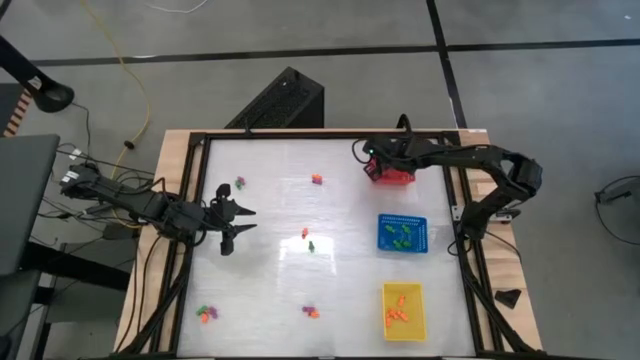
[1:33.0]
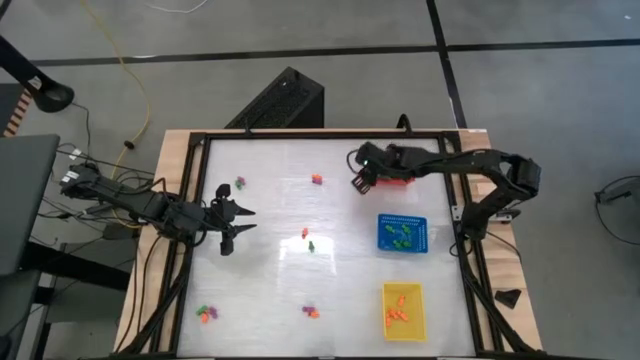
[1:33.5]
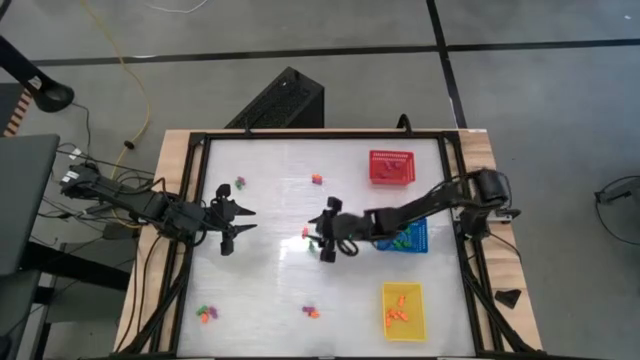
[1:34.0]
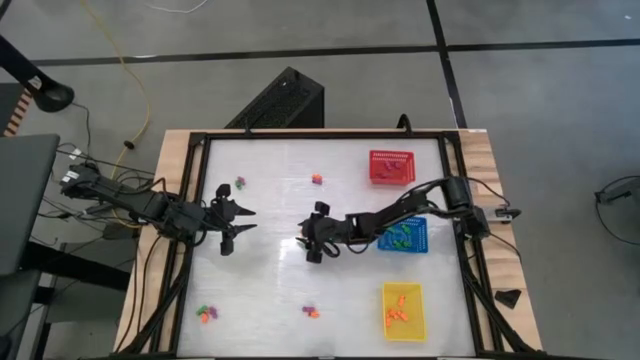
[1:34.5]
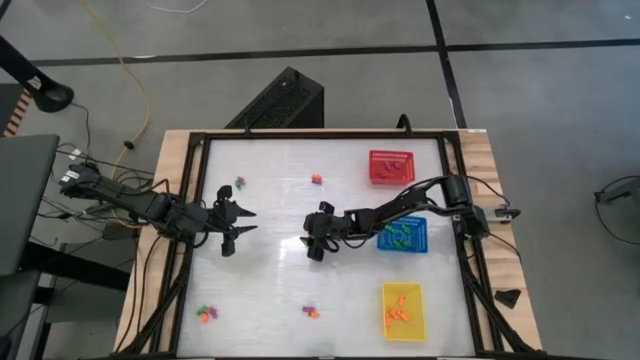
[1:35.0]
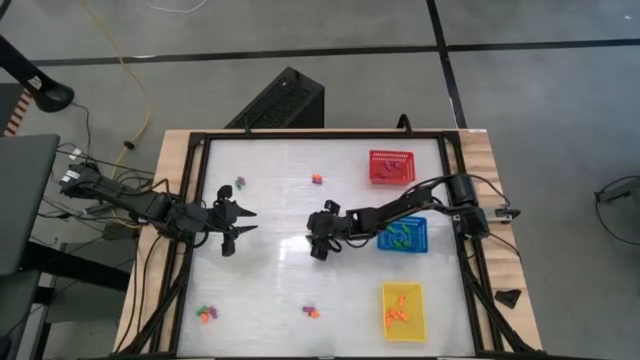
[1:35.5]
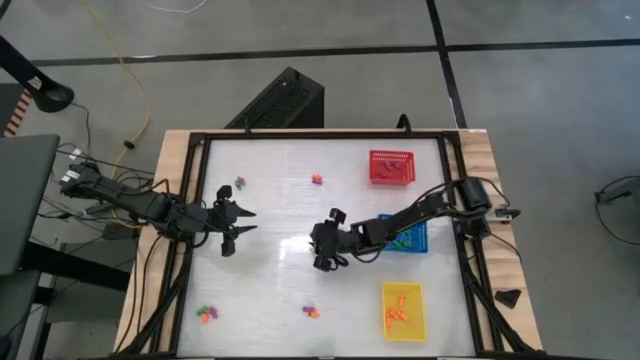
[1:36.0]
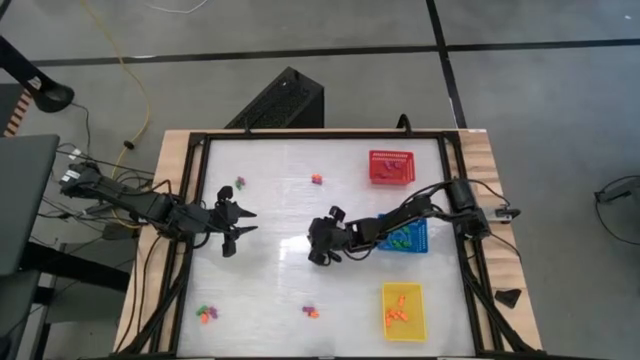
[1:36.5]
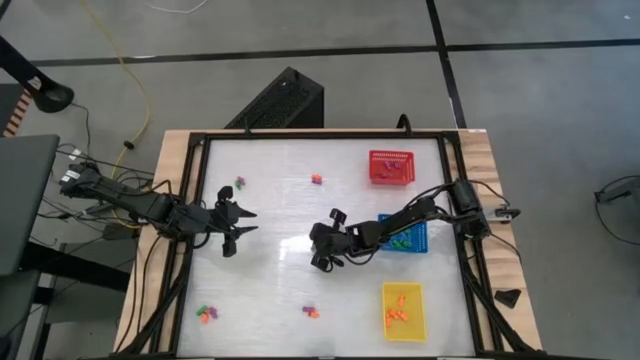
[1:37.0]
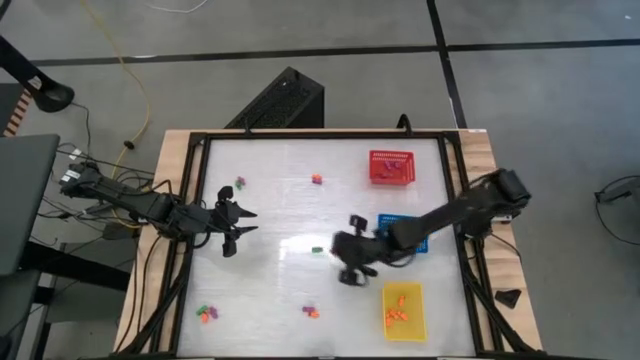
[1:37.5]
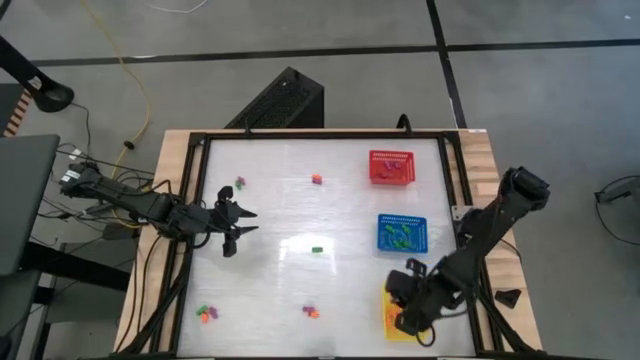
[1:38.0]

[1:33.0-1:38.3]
Task: Sort Halloween decoration
Put the orange skeleton toy into the yellow basket

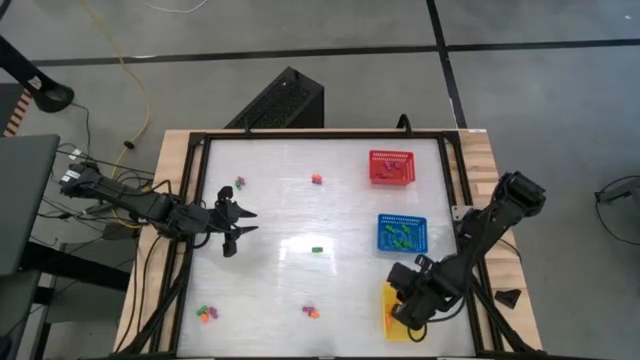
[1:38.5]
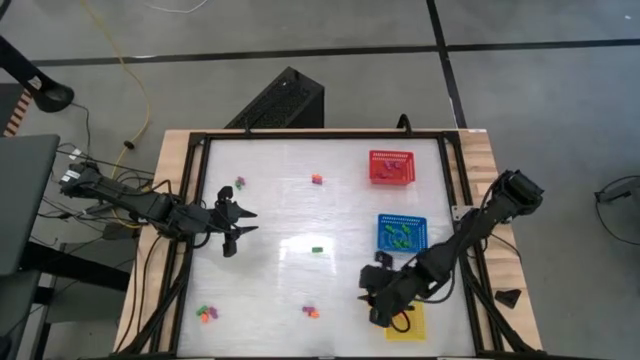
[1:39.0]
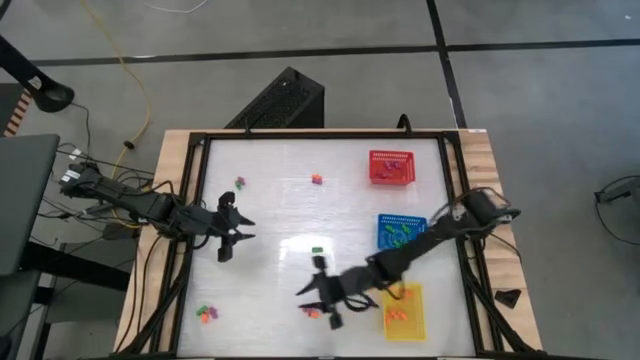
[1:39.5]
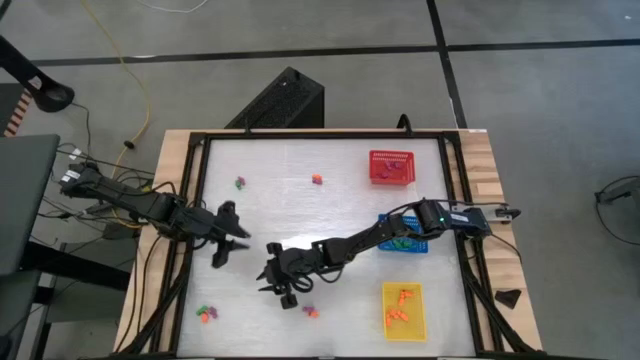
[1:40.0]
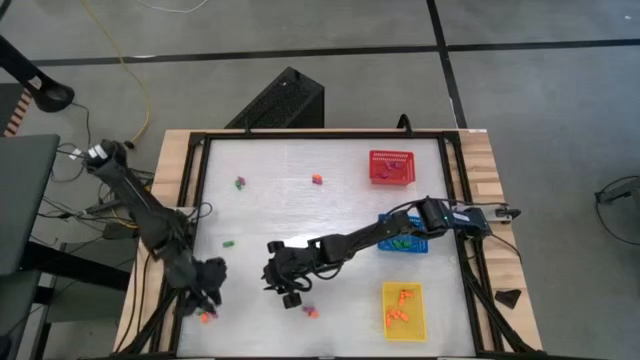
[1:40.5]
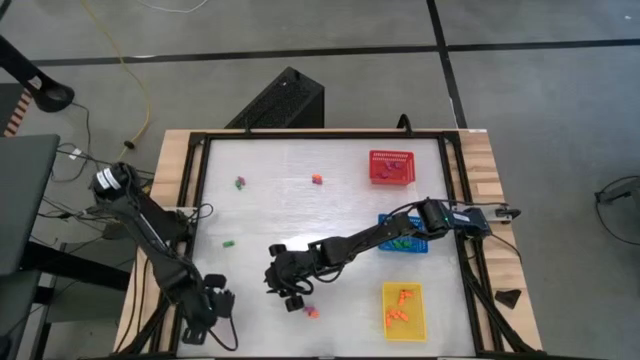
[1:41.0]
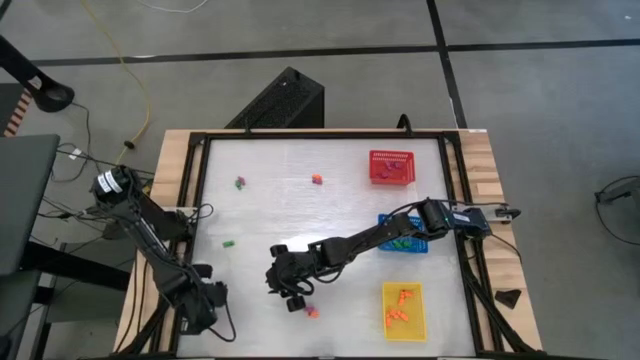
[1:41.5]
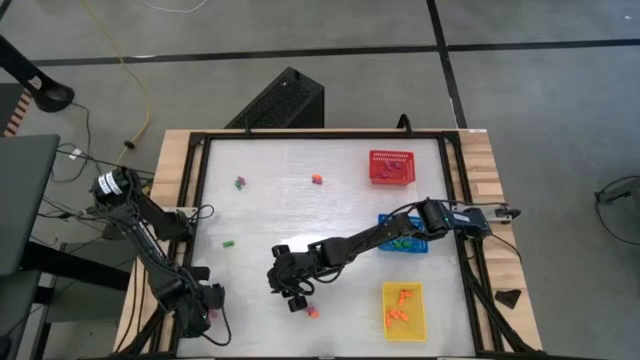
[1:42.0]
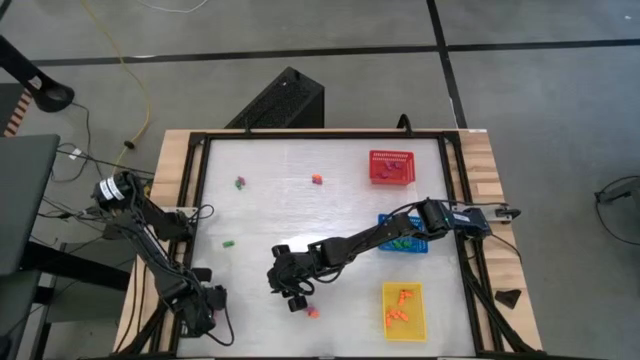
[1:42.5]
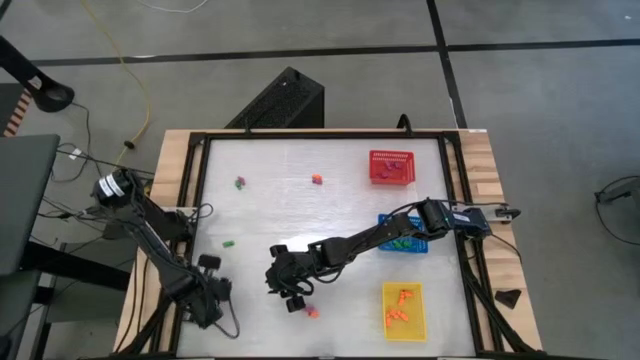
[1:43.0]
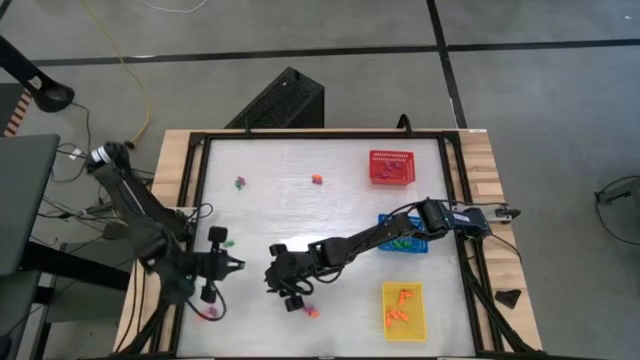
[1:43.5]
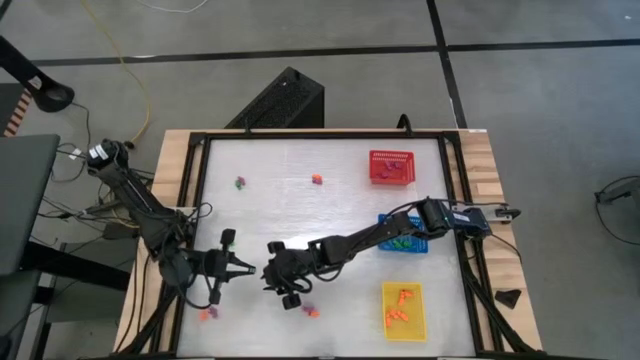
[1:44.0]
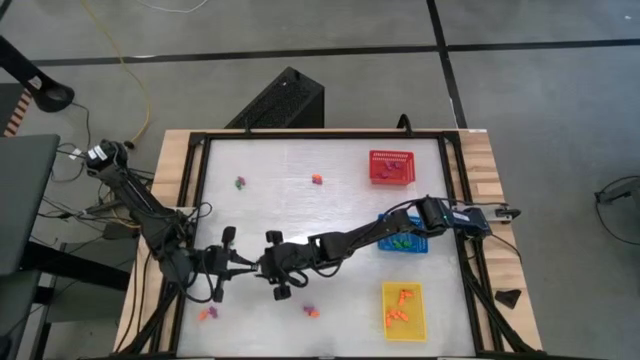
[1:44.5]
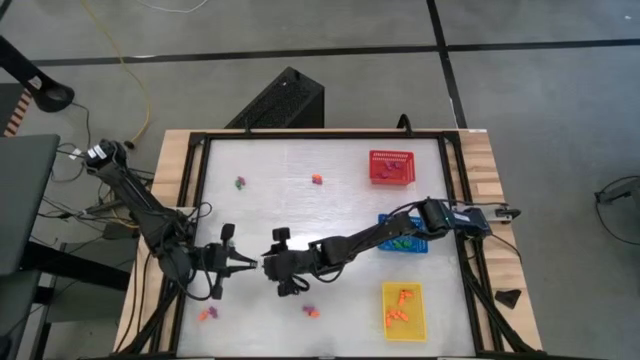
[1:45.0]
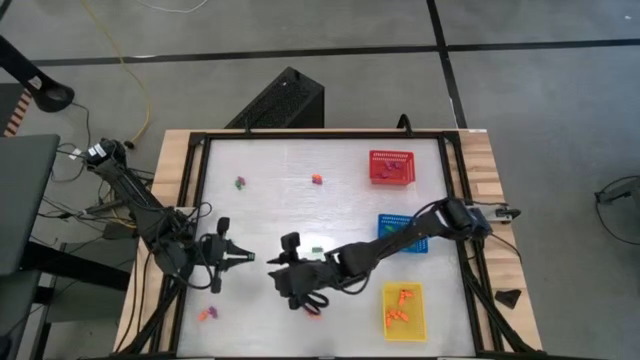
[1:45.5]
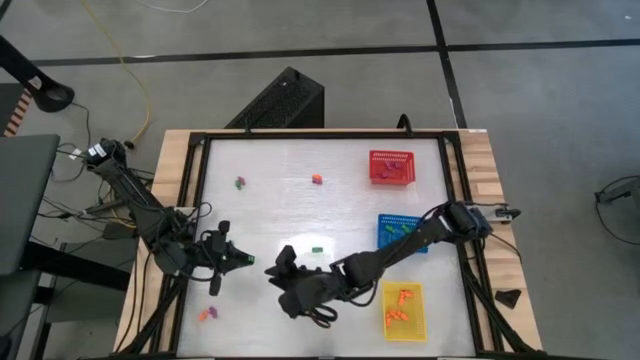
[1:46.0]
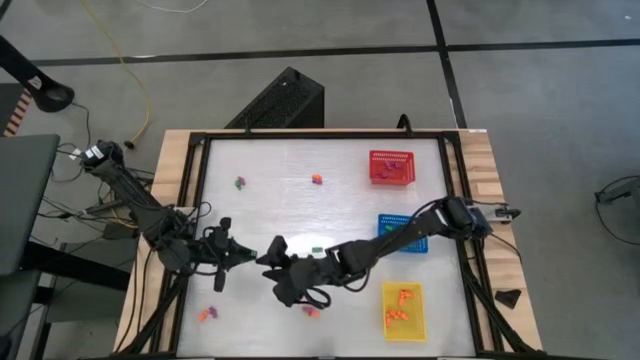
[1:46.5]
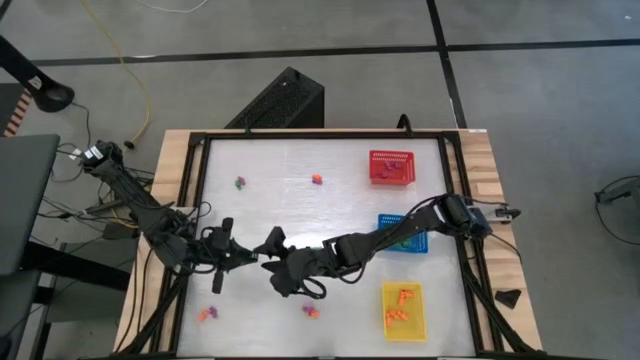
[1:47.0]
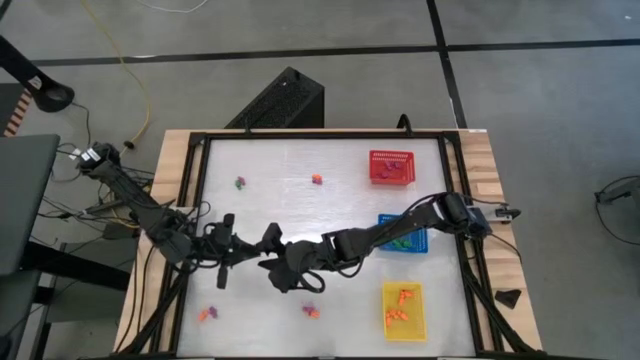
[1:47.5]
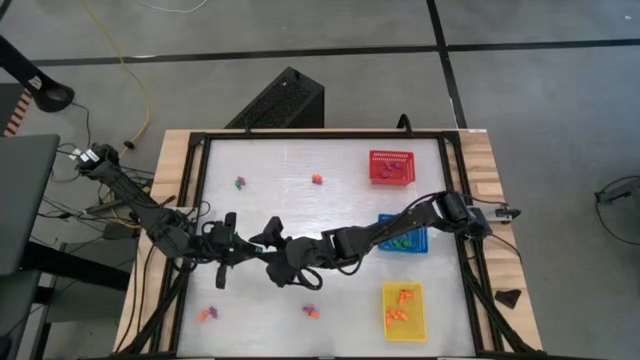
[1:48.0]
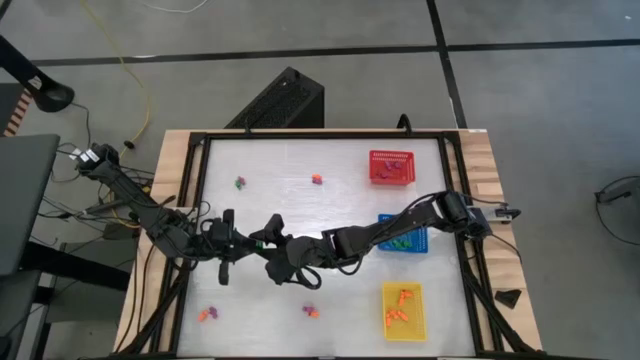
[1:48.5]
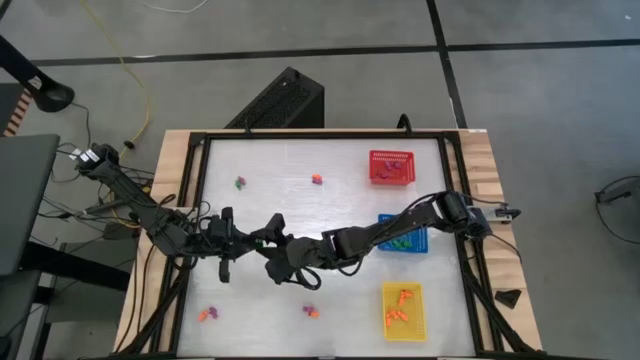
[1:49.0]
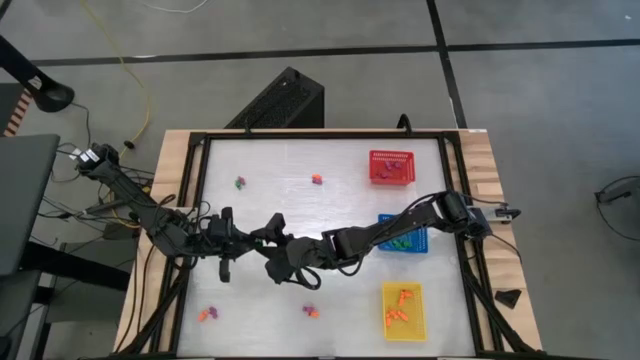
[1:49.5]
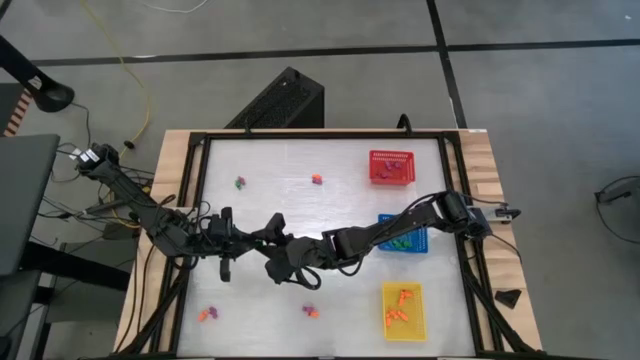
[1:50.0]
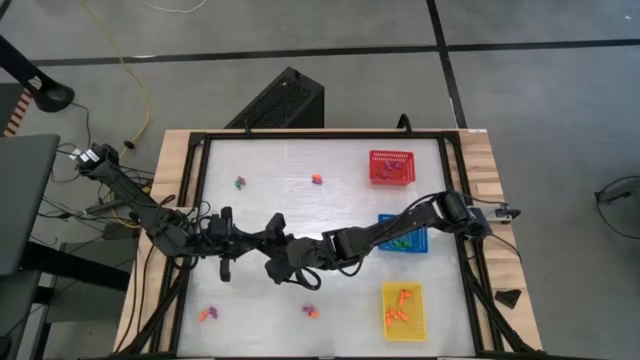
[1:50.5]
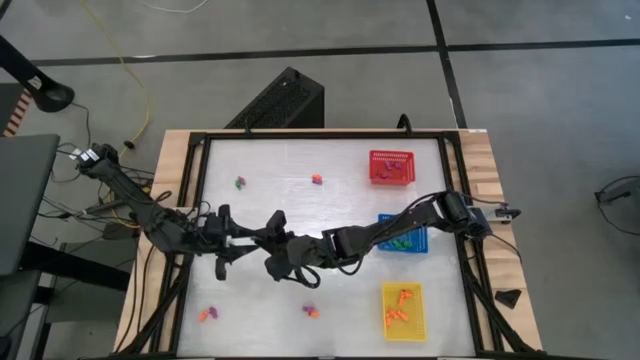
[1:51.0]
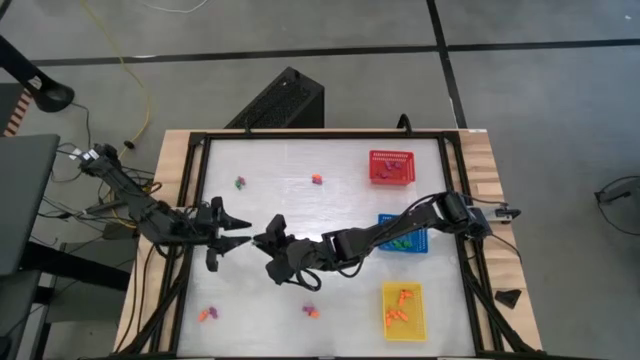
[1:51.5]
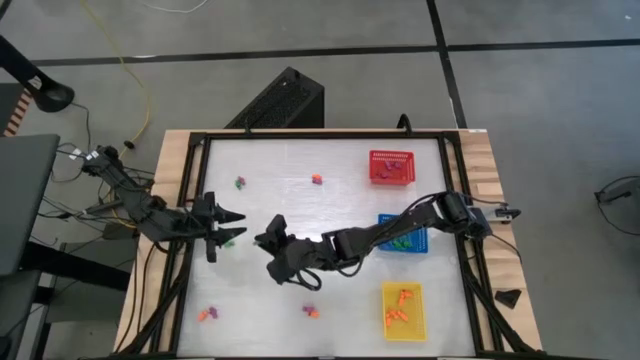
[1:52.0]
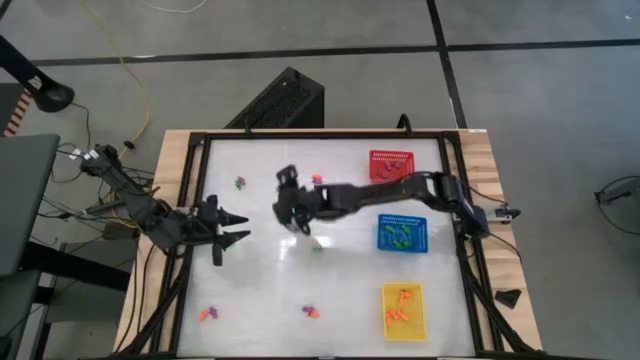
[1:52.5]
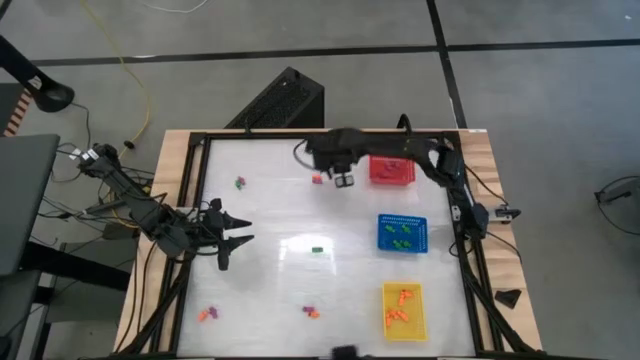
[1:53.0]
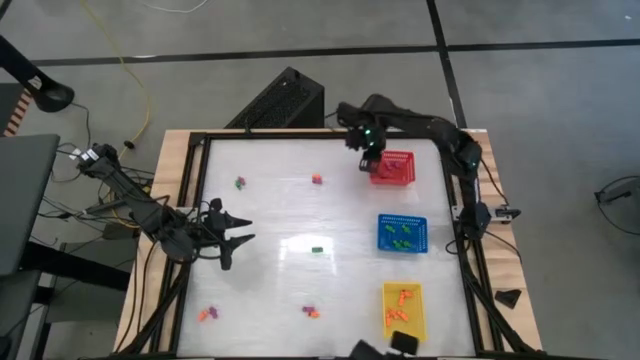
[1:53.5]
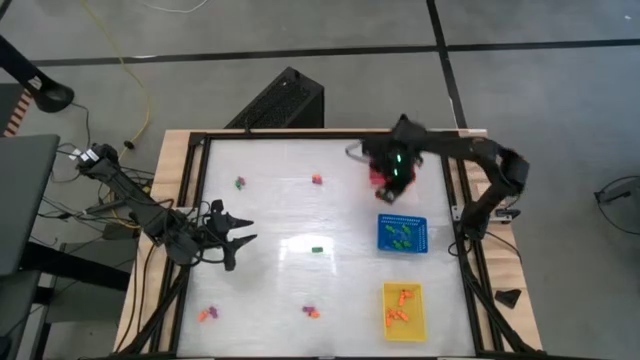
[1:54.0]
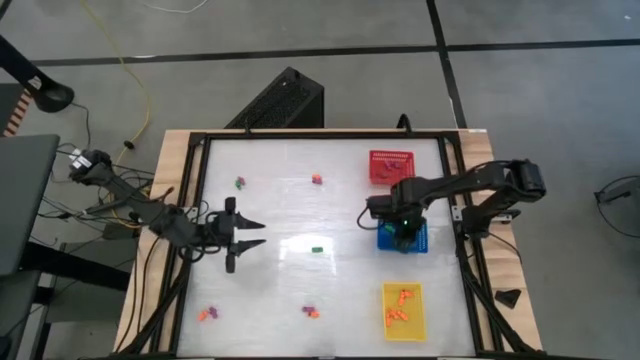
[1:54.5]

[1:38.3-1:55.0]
Put the green skeleton toy into the blue basket
